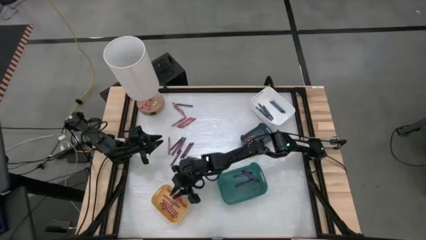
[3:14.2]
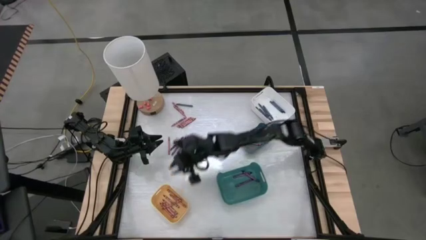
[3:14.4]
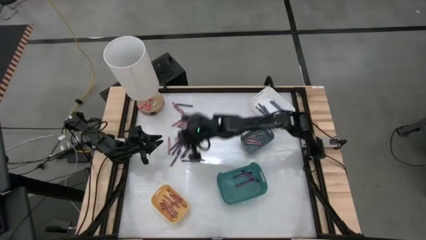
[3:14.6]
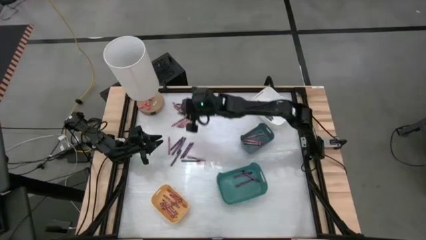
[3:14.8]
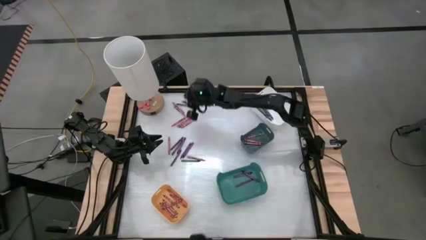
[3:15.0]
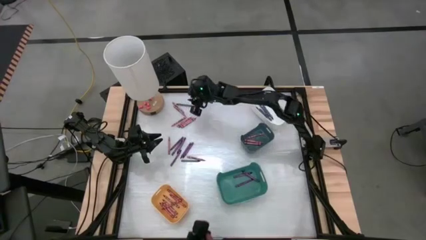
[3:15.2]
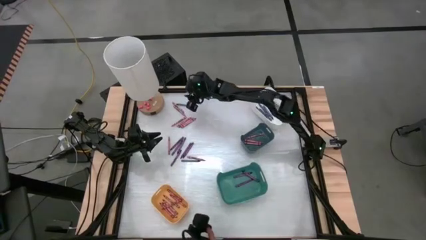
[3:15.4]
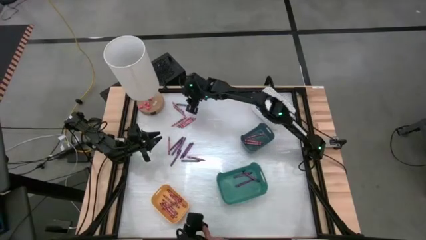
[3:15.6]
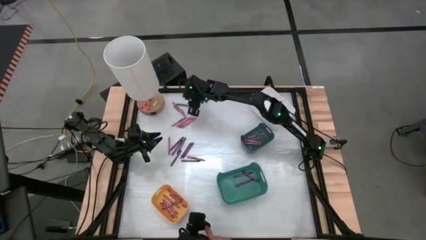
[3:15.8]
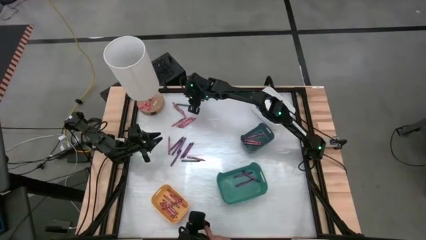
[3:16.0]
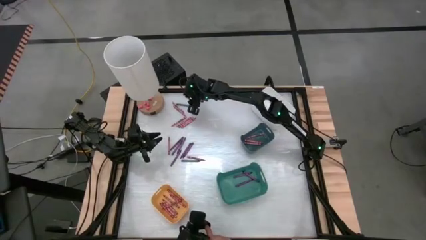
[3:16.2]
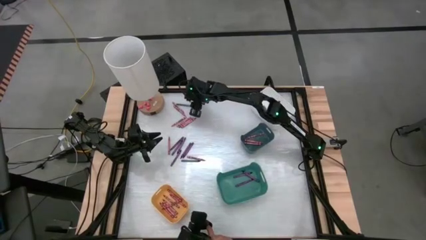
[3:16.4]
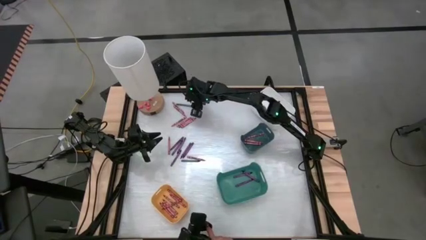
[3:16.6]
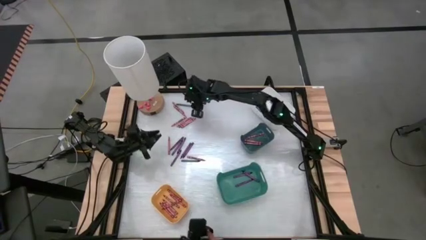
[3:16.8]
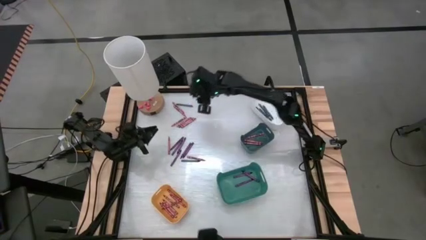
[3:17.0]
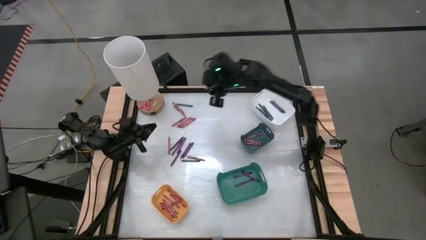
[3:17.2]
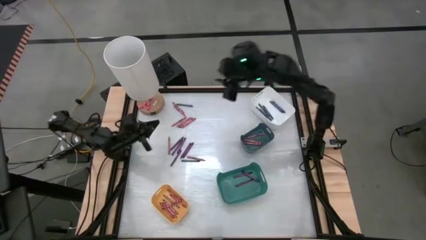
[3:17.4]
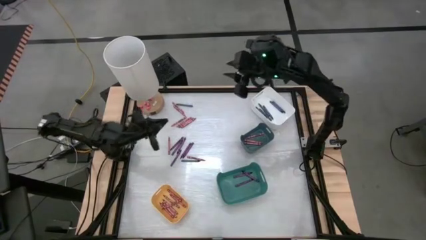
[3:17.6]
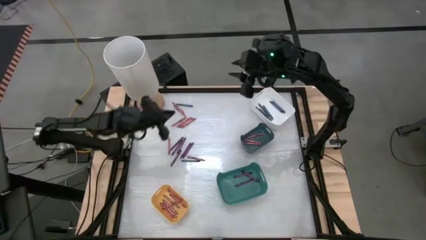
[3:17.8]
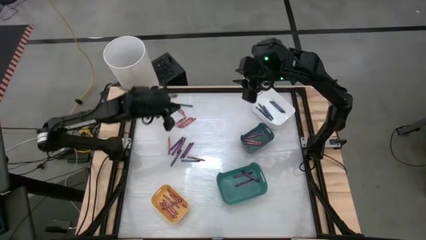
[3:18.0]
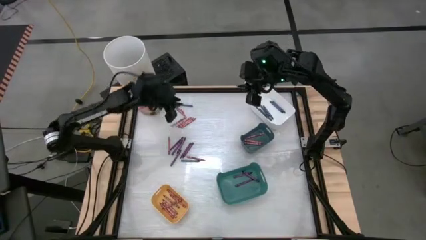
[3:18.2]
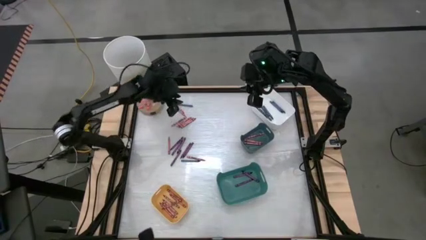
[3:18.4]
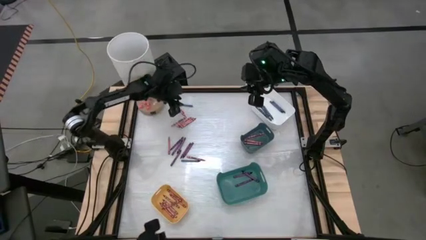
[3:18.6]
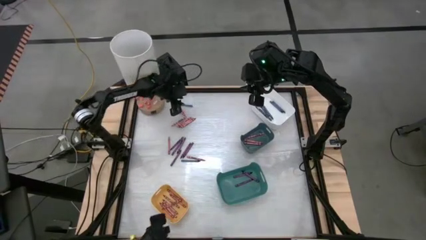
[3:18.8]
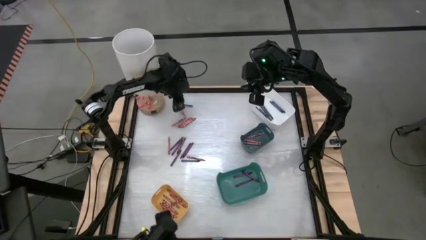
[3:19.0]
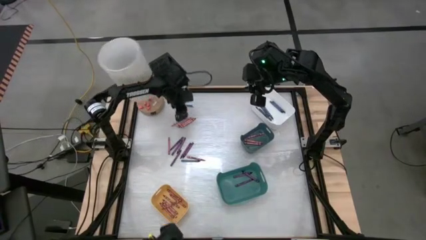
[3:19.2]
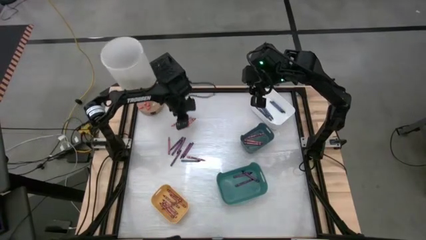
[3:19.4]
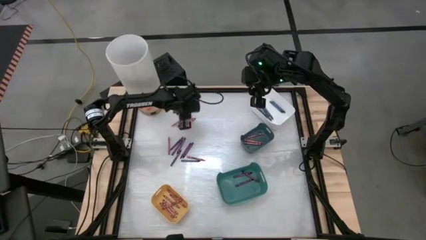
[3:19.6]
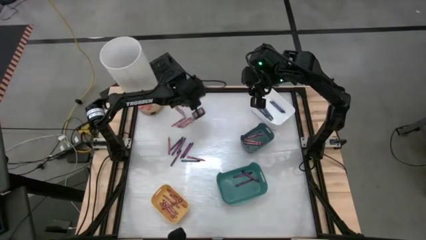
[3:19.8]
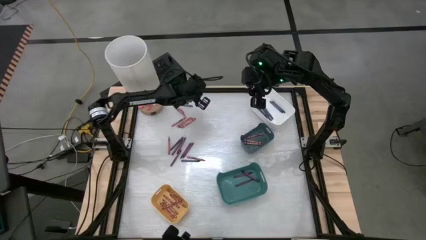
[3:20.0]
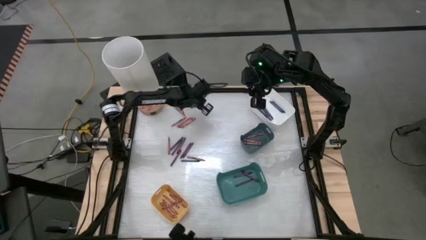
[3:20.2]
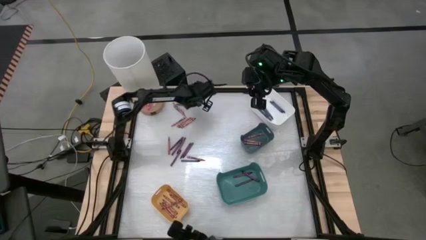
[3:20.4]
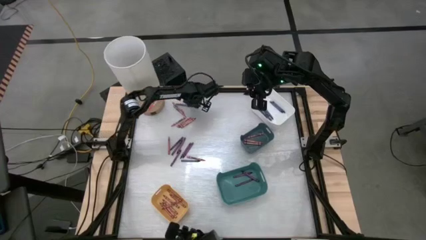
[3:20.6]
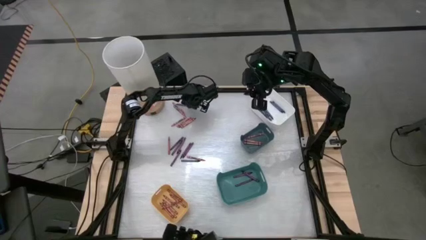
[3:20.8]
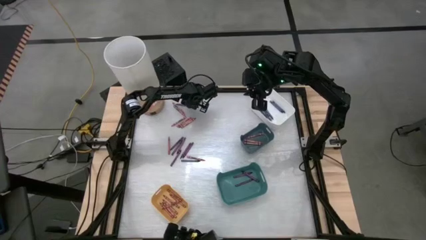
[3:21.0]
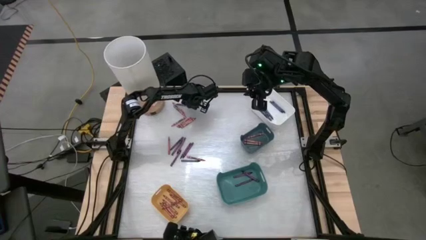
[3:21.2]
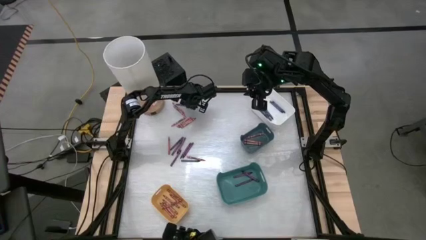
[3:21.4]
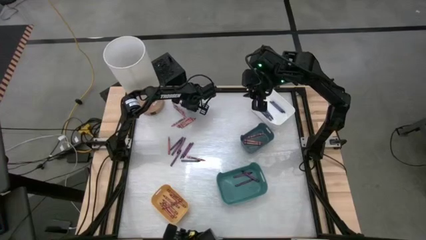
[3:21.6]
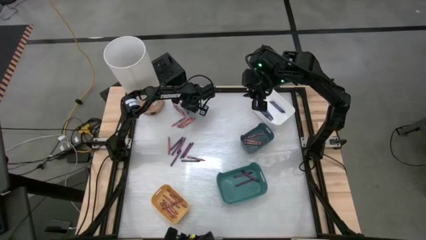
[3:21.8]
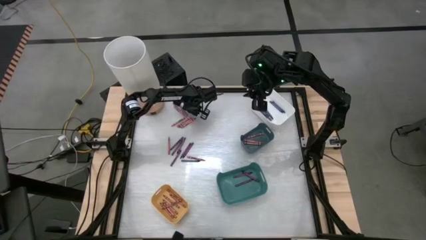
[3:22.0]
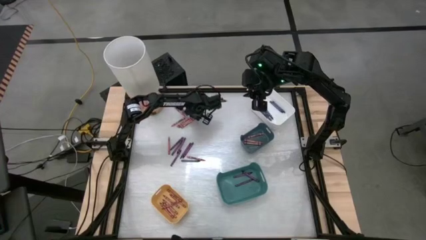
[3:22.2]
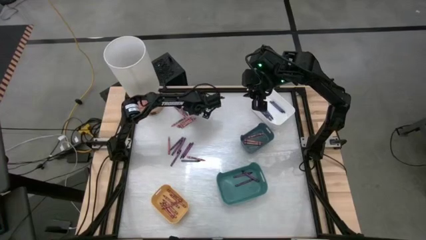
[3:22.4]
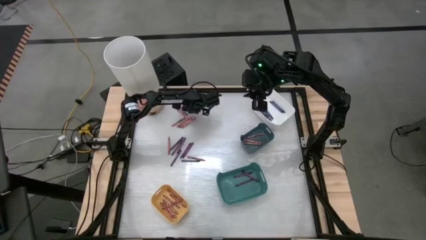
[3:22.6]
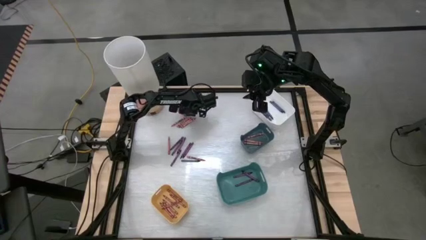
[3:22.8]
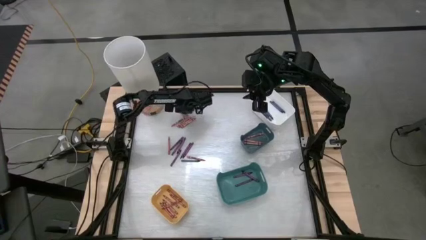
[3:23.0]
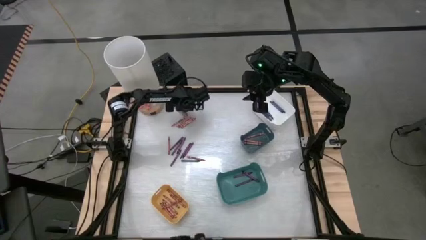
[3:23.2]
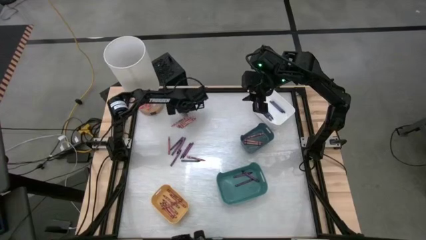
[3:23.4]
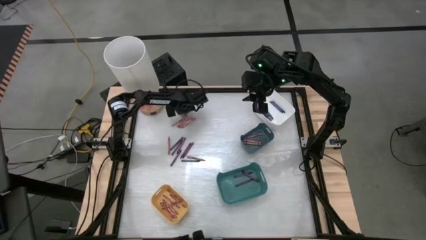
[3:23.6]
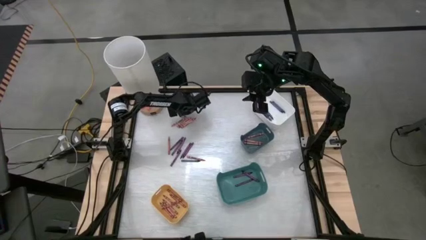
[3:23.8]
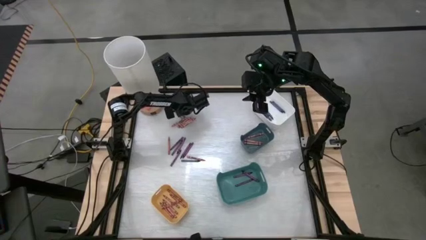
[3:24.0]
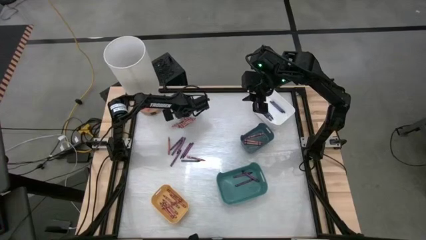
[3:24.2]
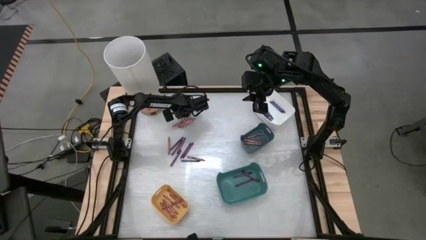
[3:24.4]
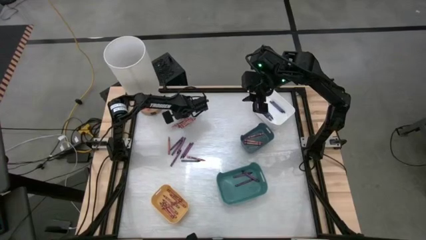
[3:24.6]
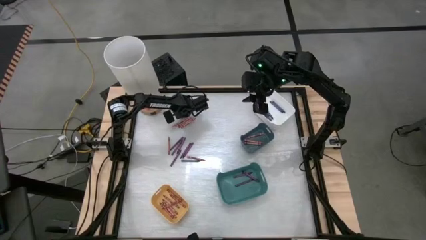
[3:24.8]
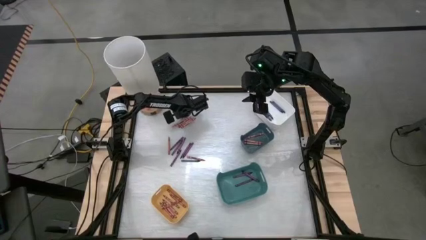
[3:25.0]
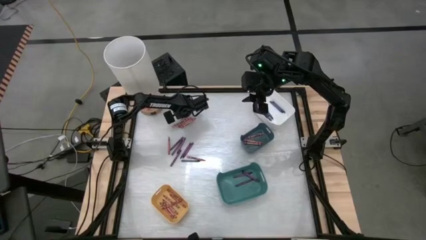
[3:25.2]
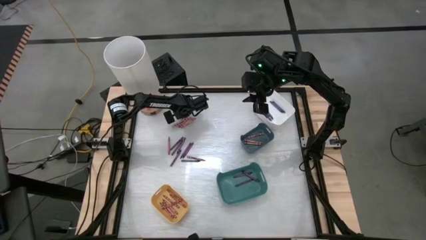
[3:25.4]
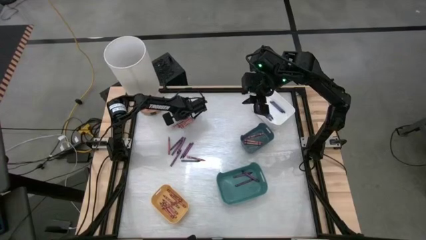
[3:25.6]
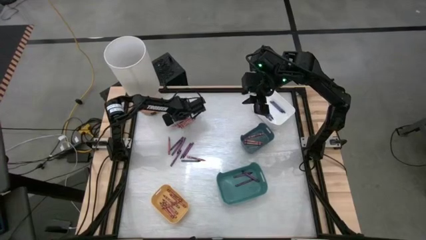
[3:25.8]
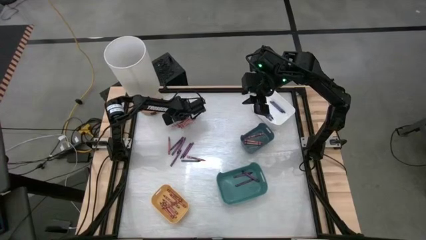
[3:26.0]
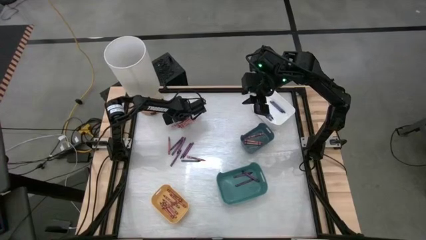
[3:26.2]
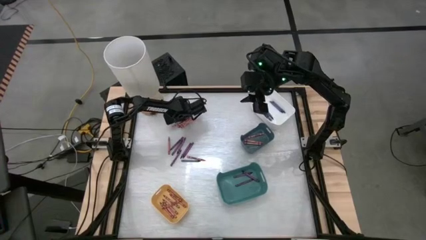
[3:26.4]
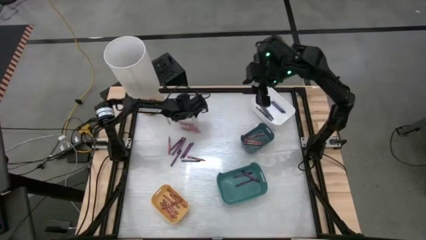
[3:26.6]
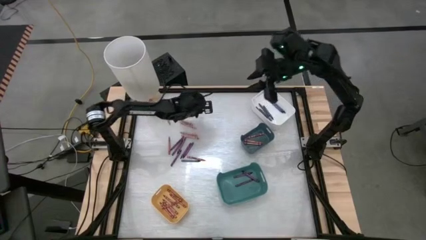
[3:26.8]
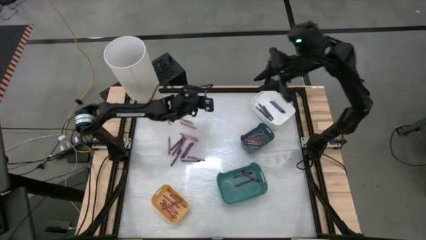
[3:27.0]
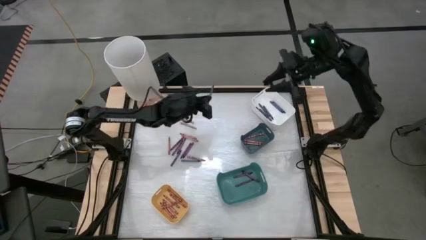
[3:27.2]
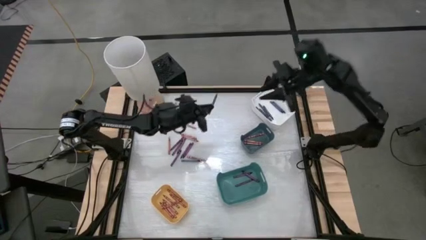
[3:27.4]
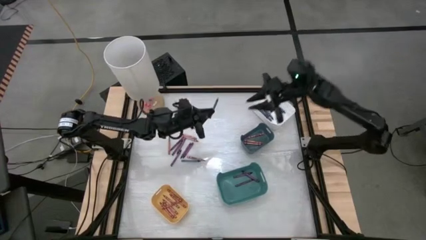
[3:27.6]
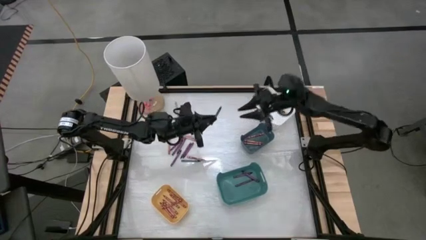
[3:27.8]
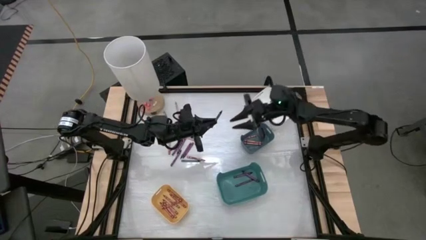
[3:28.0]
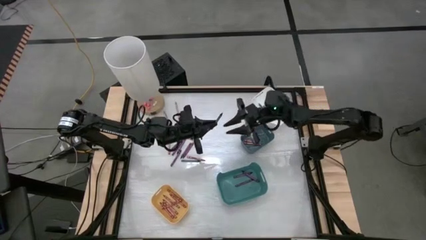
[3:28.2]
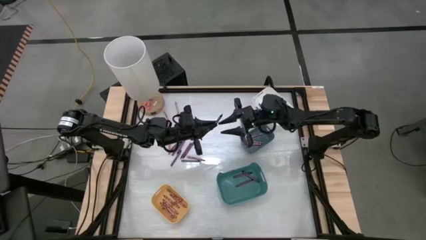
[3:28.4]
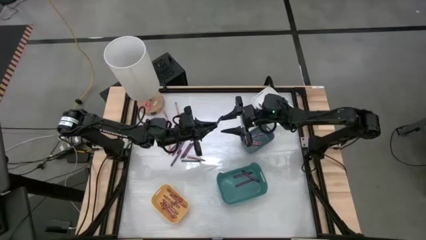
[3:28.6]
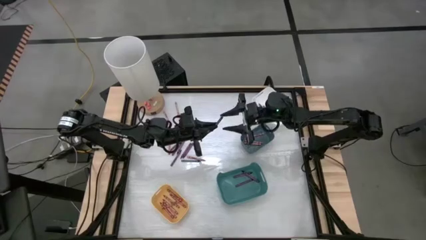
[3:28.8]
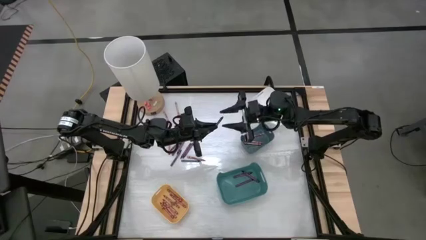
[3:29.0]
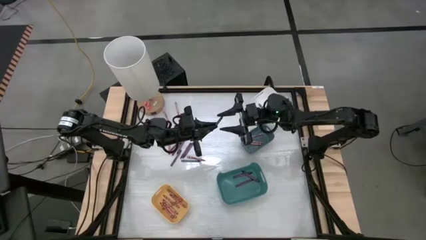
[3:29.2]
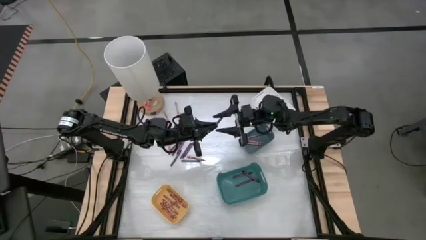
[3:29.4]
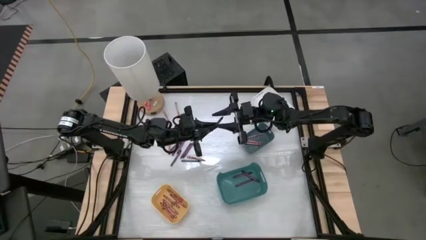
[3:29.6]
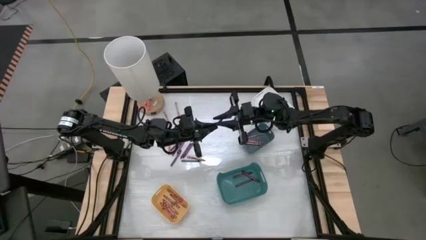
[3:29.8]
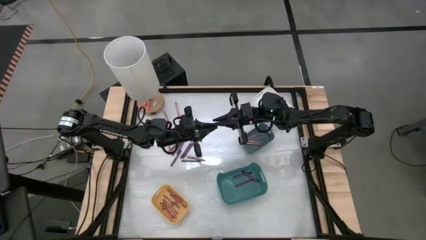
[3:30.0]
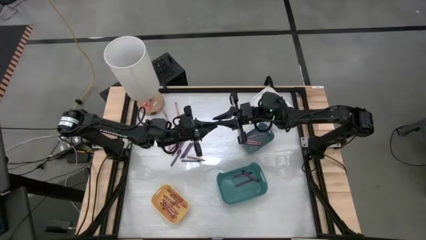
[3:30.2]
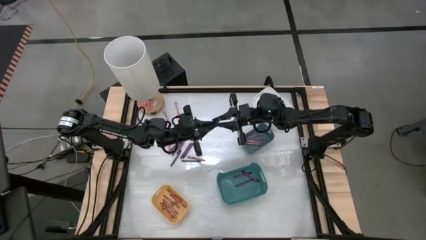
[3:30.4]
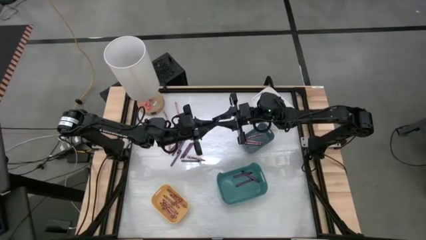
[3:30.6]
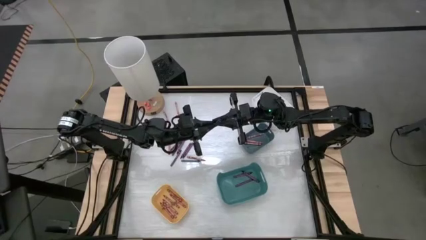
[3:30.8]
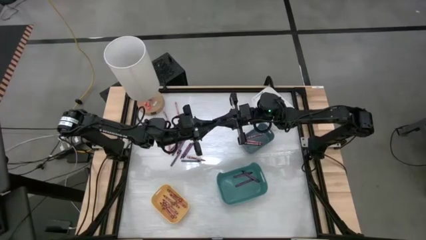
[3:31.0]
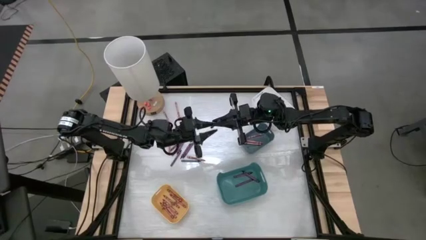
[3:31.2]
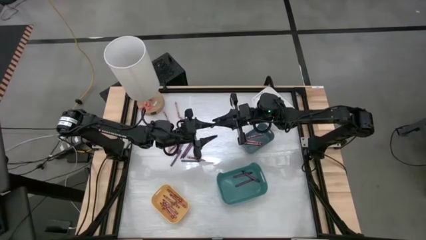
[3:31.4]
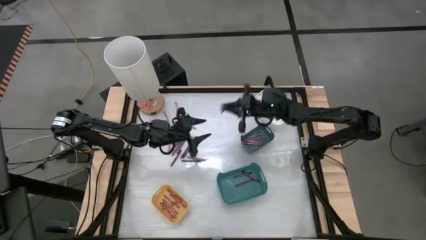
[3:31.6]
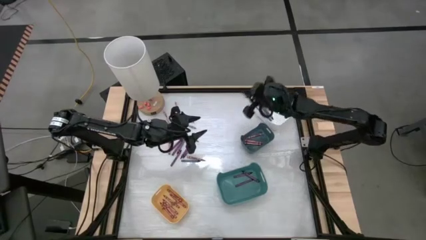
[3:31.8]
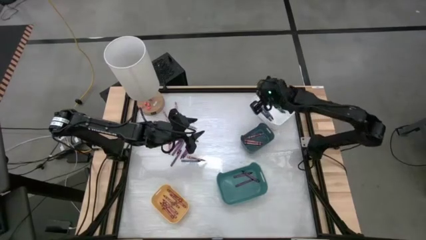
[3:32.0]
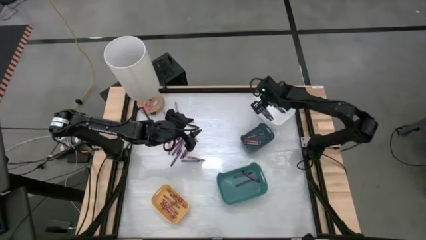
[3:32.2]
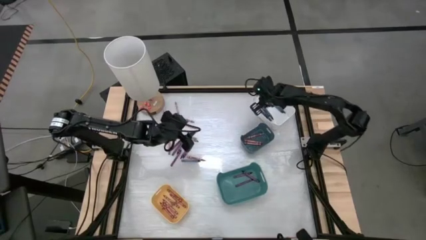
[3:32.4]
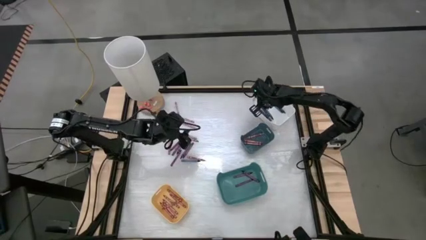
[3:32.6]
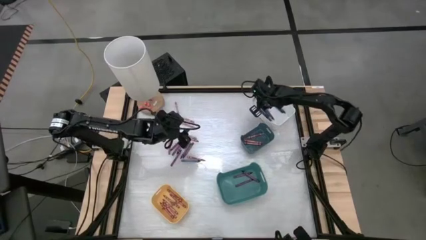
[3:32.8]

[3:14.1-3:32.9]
Task: Sort crayons
Put the blue crayon into the white bin
